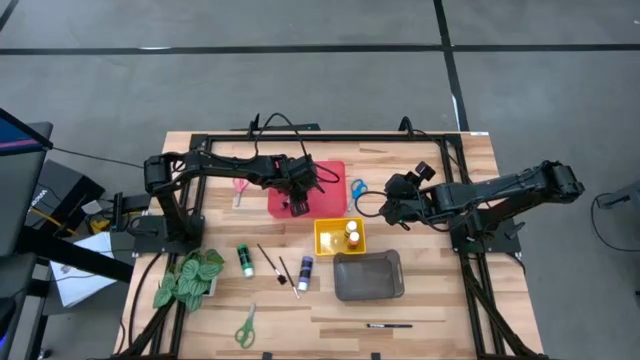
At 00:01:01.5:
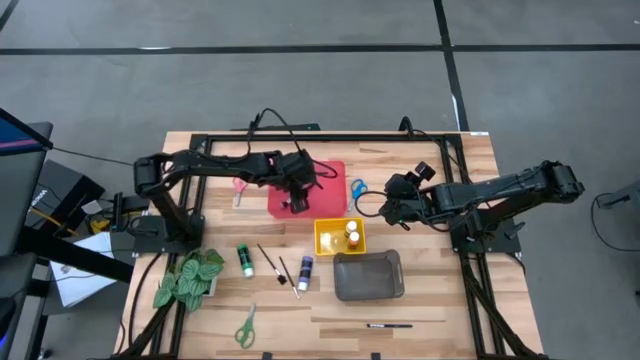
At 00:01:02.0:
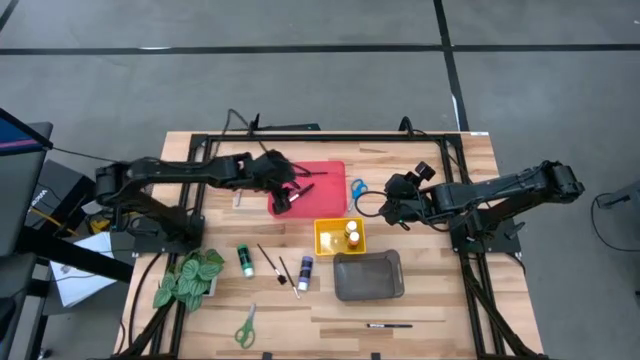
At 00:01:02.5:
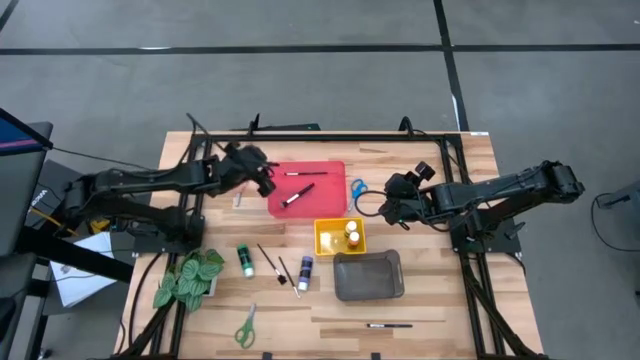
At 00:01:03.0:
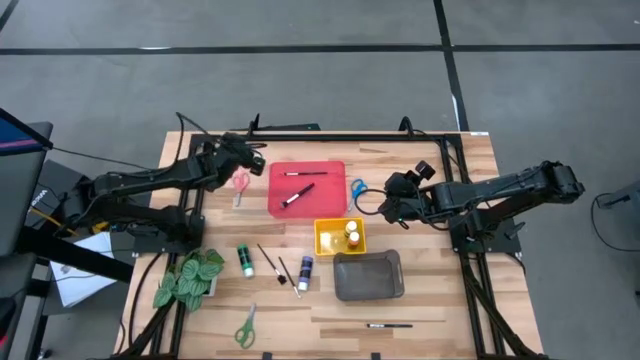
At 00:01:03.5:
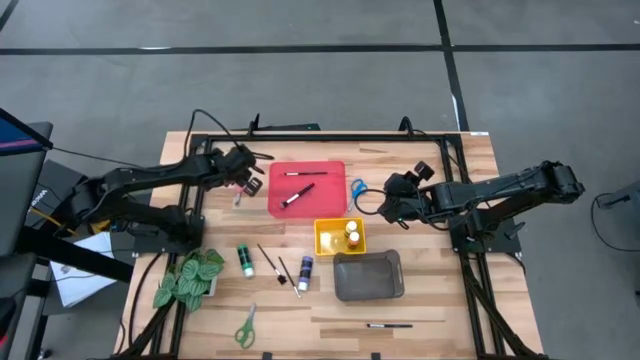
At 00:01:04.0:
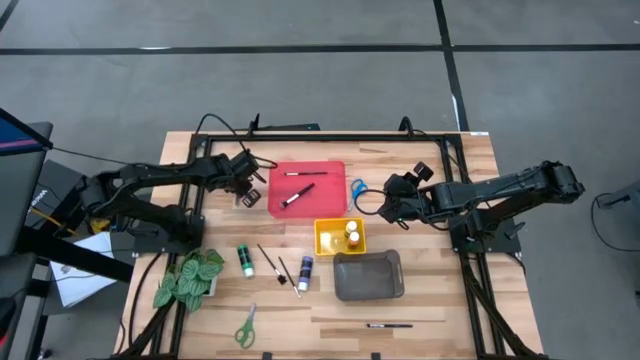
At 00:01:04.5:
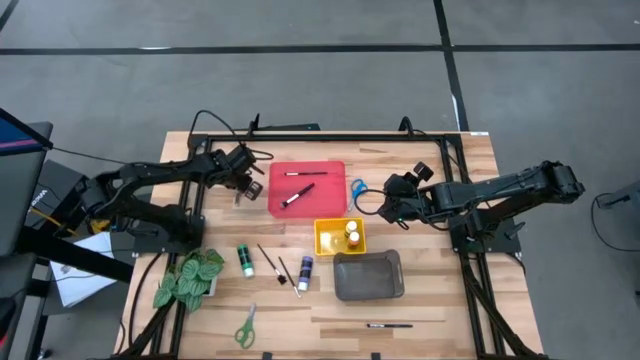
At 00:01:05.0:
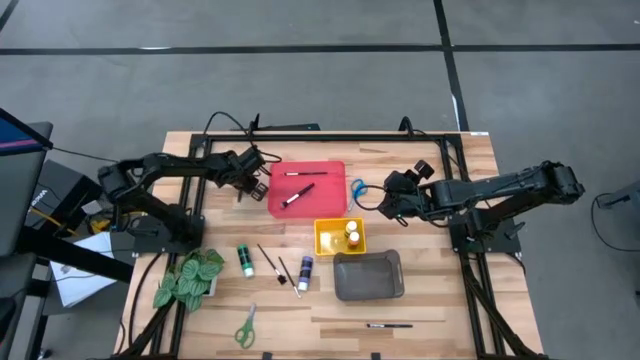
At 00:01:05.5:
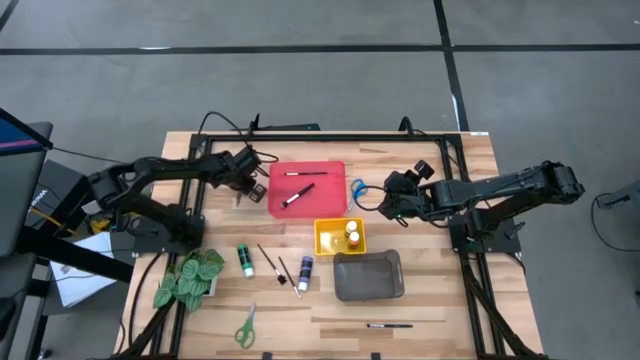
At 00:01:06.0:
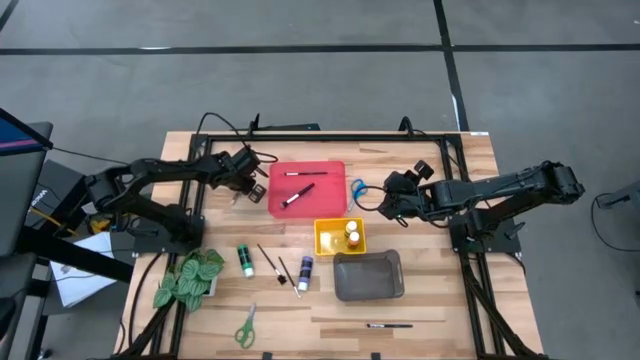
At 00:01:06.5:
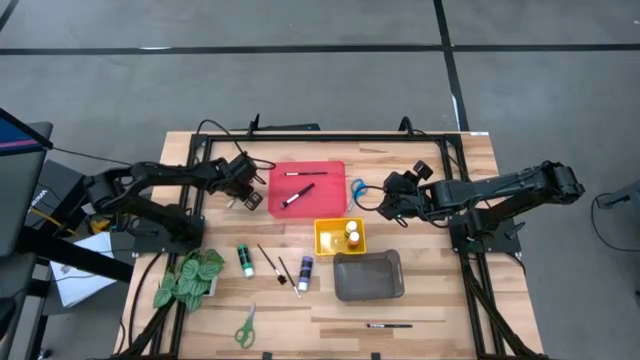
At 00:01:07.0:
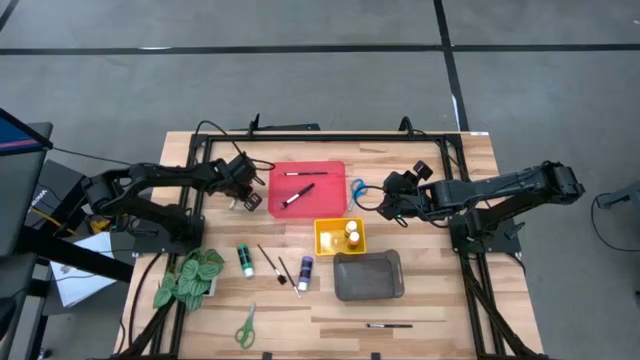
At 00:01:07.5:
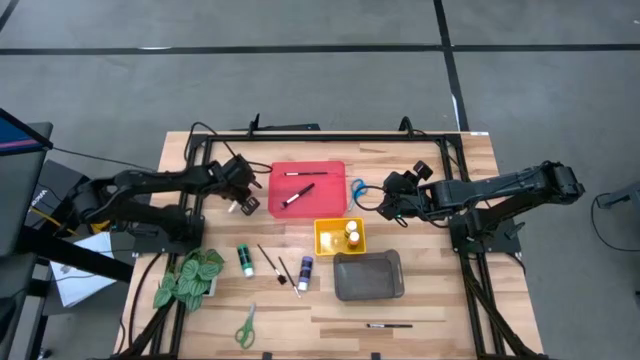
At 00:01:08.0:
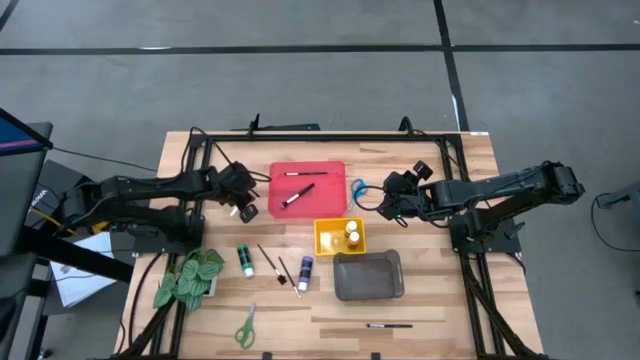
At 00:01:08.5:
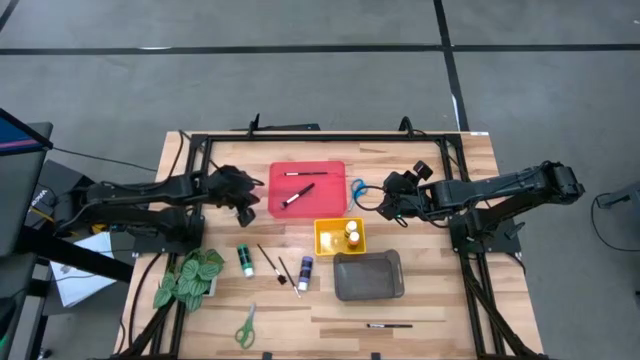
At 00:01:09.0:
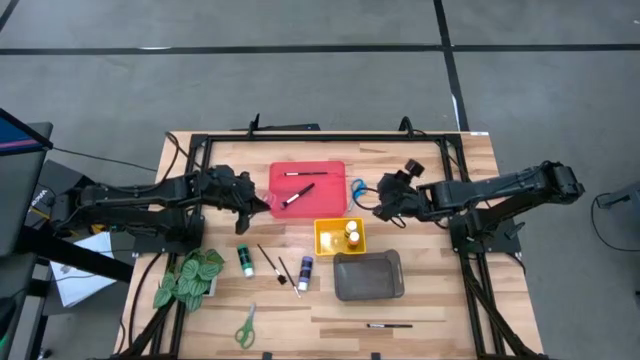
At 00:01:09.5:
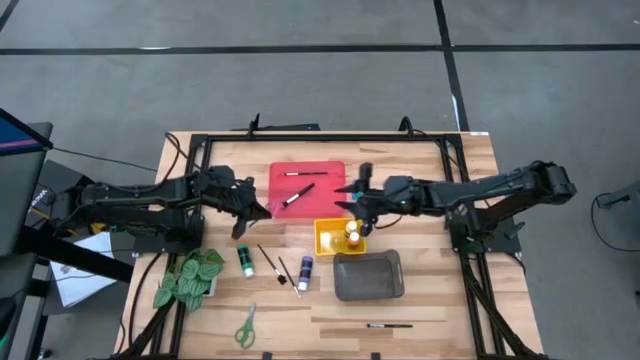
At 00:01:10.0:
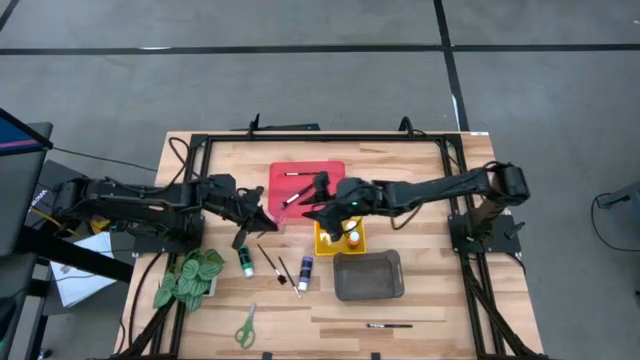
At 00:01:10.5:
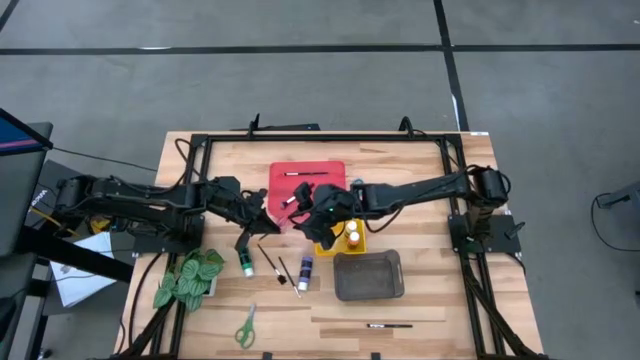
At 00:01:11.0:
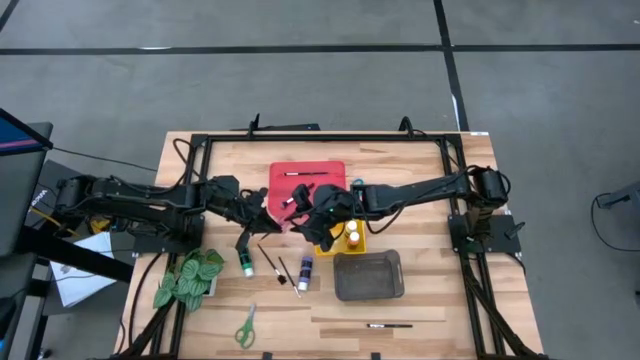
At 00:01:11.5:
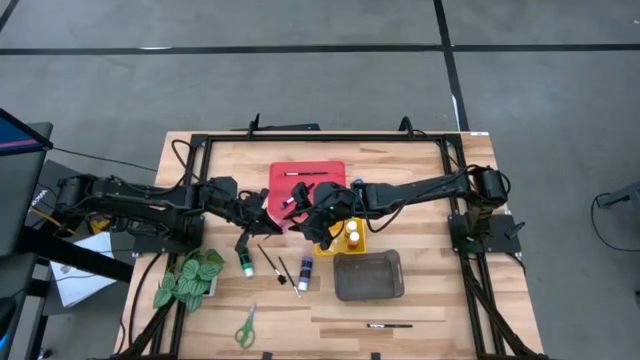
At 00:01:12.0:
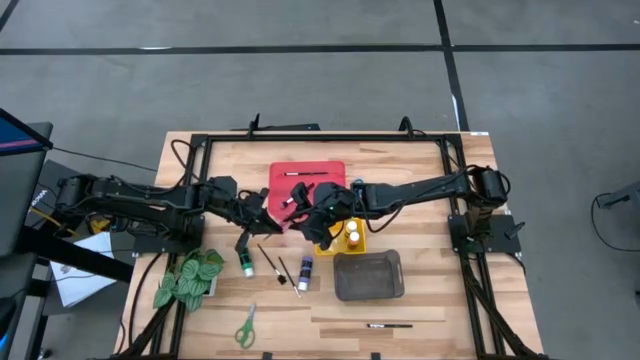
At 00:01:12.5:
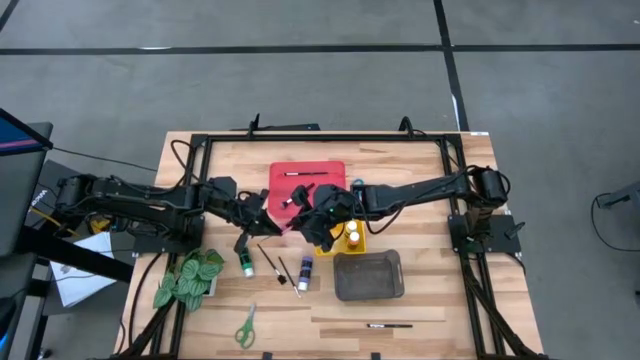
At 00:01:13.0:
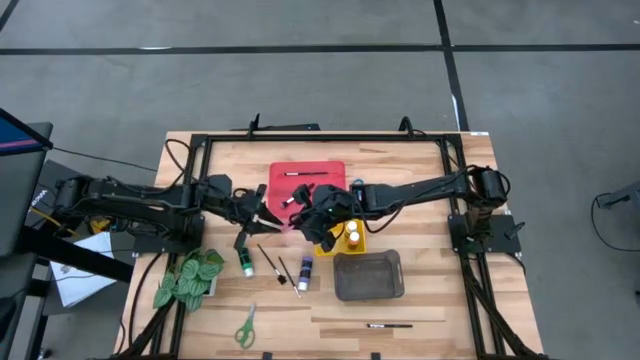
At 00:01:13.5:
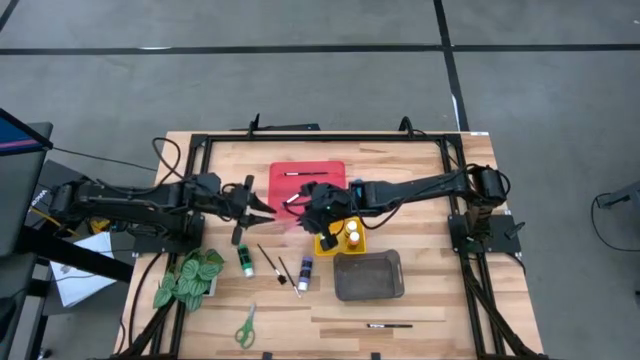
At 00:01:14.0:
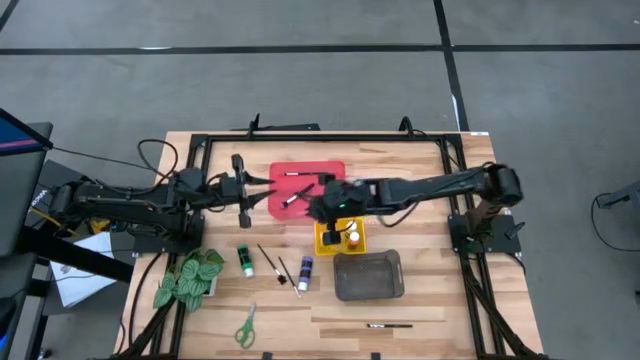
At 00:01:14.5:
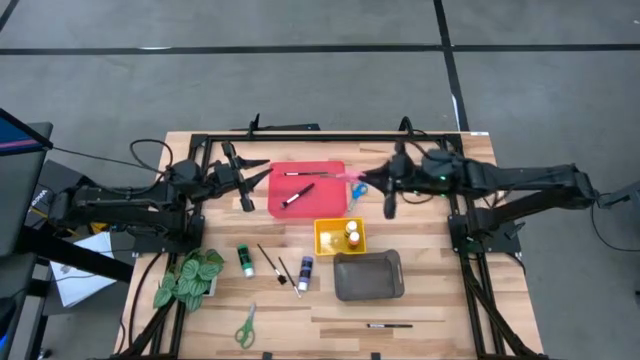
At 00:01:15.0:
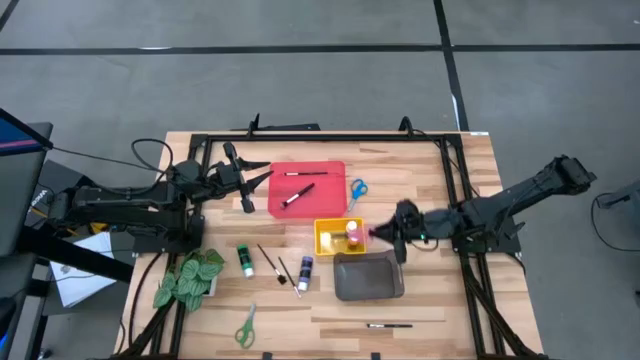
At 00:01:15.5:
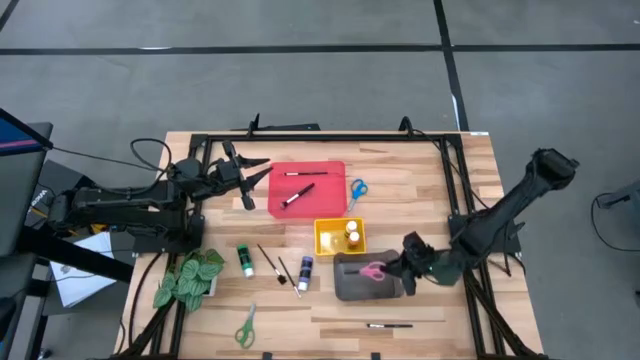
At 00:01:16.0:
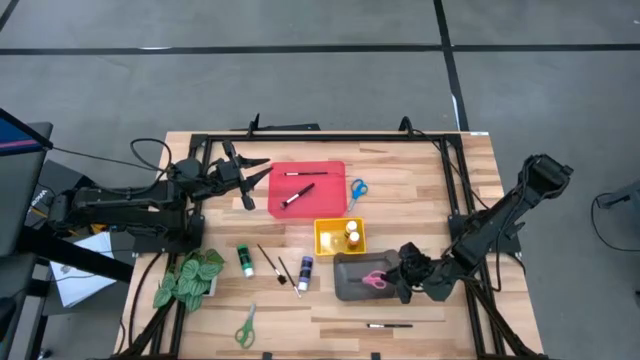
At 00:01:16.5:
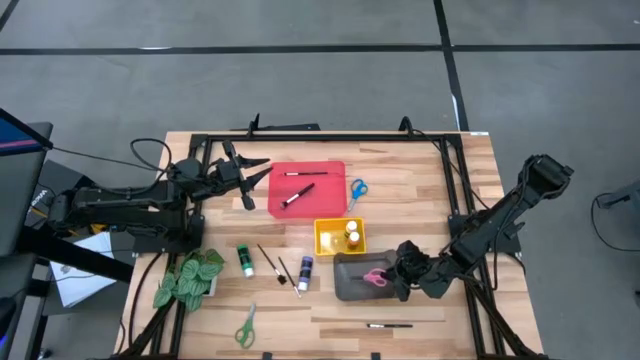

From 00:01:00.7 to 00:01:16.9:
Task: Pick & Place Paint Supplies
Put the pink scissors into the black bin

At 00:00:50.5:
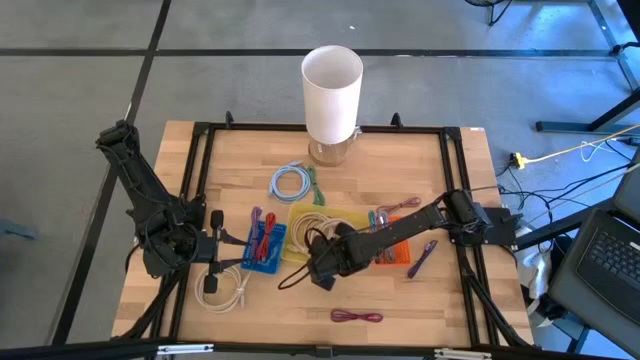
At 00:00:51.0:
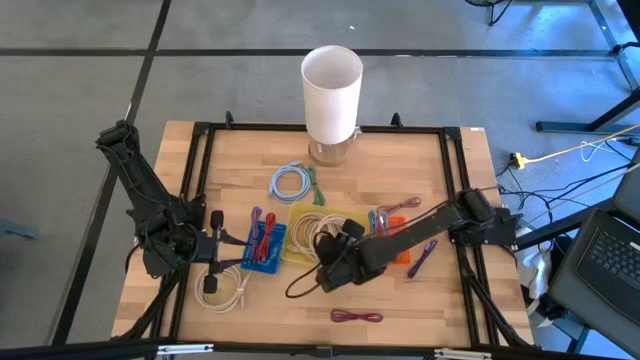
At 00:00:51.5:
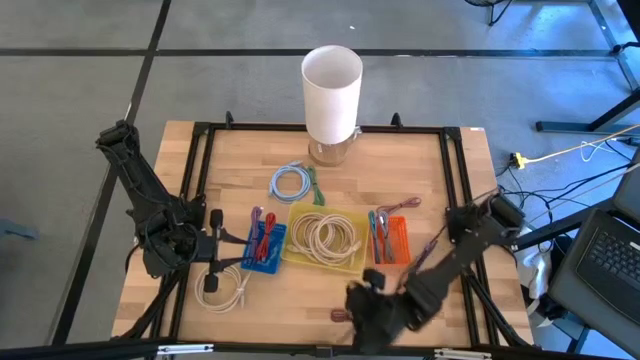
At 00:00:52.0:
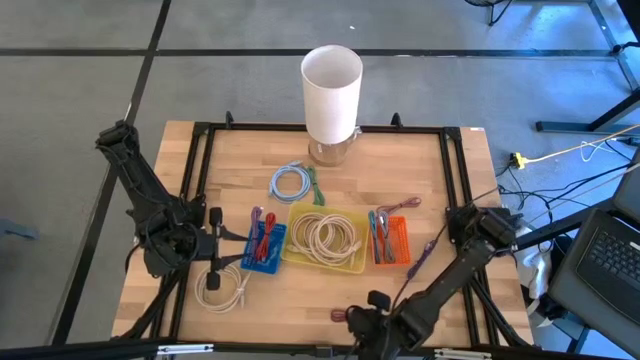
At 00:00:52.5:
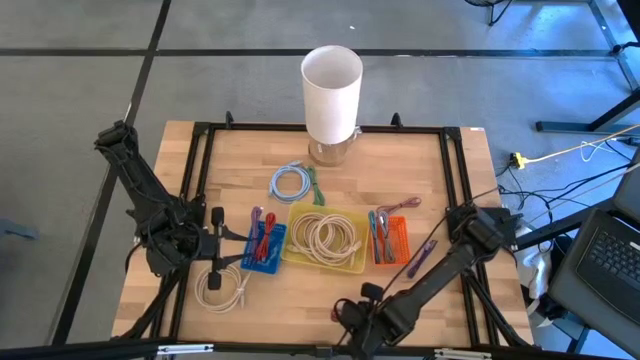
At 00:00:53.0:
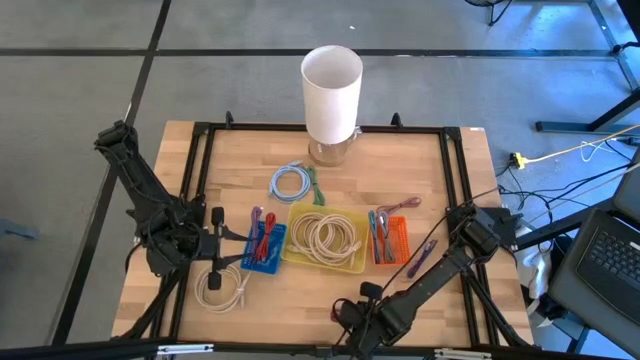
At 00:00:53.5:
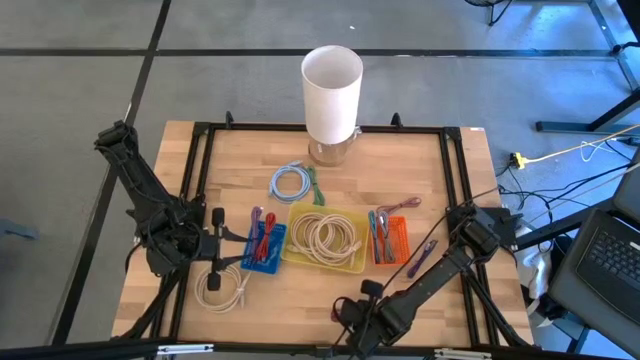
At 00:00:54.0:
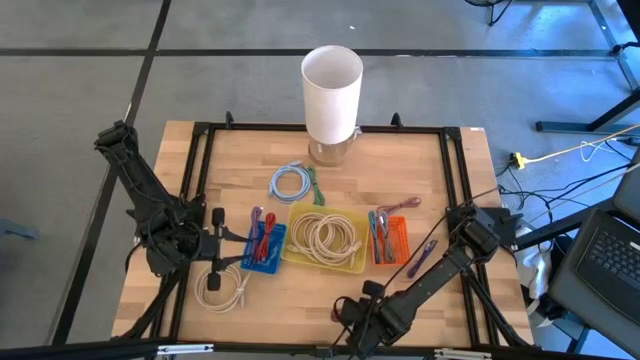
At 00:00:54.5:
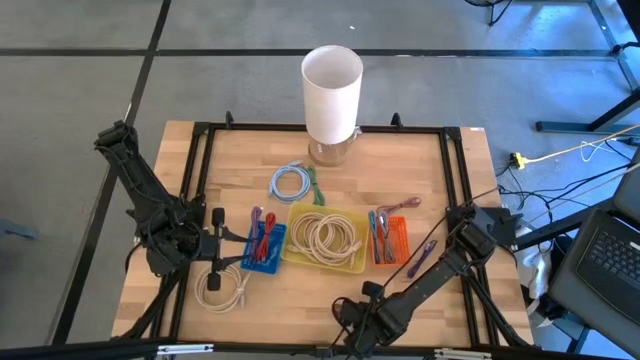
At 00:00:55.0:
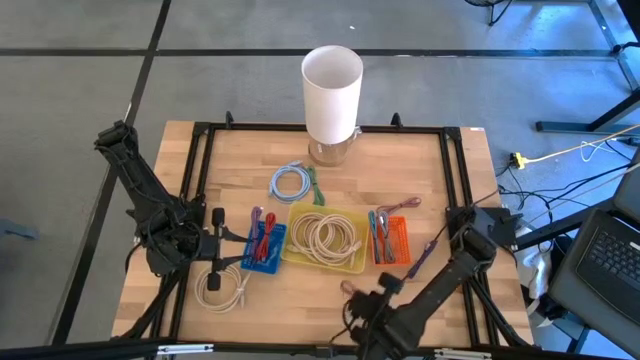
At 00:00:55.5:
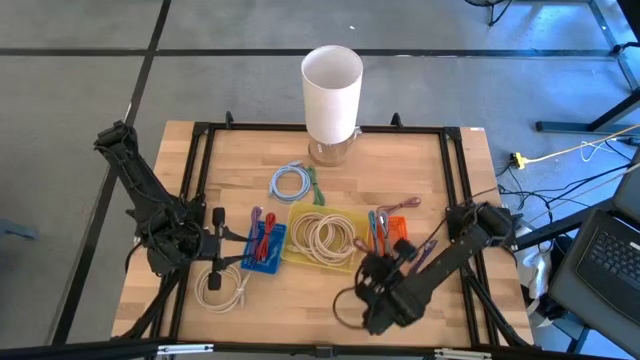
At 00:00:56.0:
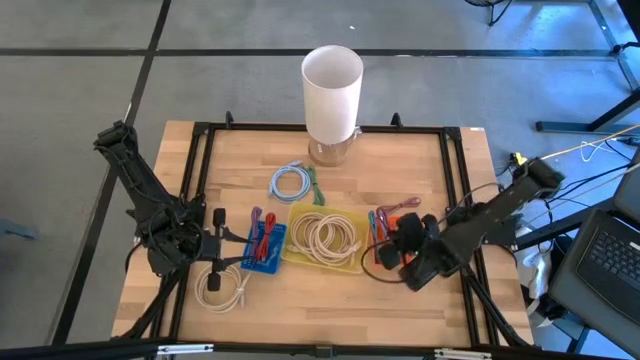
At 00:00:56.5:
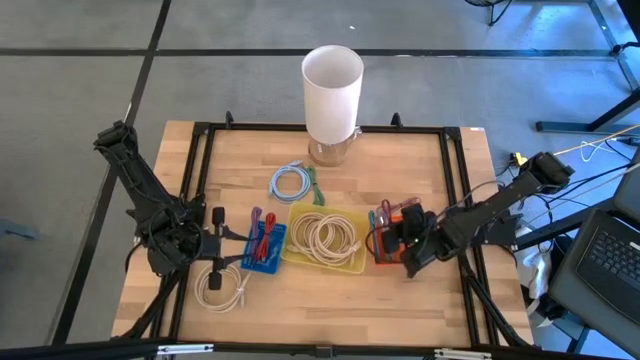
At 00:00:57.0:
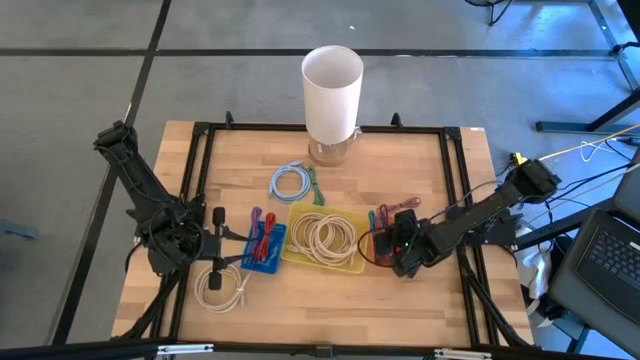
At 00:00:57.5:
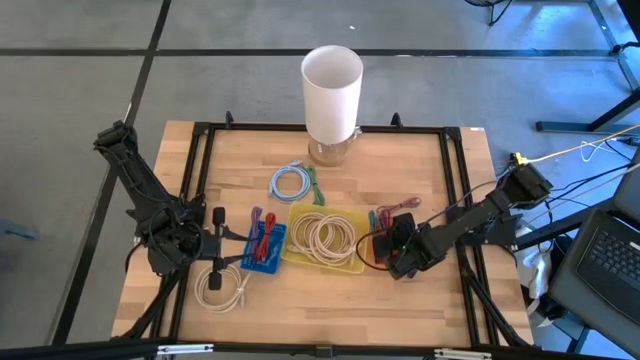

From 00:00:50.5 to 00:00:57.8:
Task: Pick & Place USB Port
Put the pink and black charger cable into the orange bin
